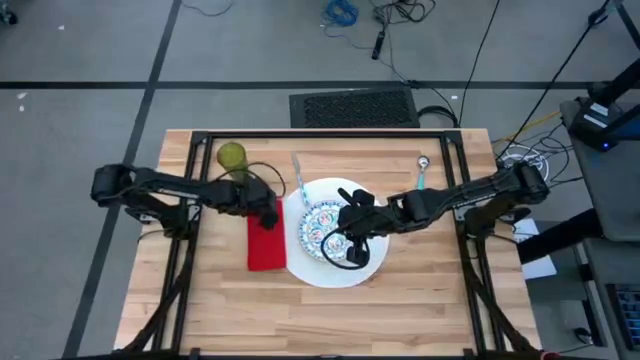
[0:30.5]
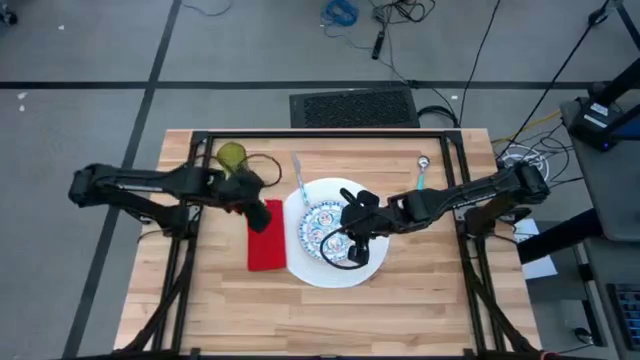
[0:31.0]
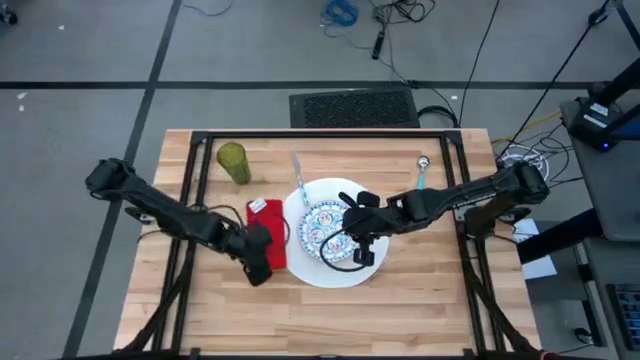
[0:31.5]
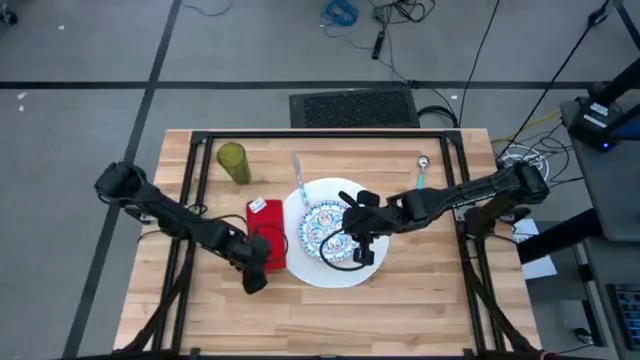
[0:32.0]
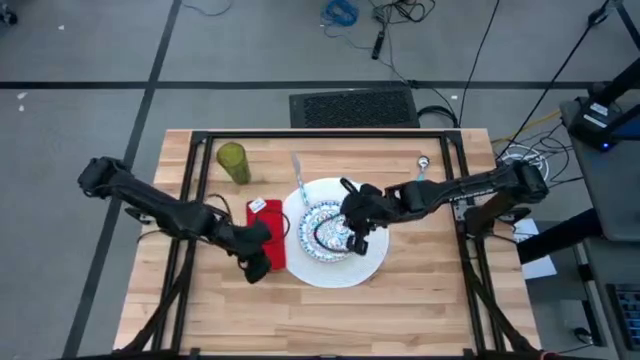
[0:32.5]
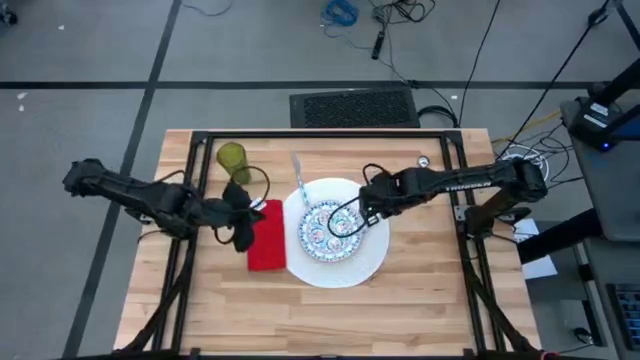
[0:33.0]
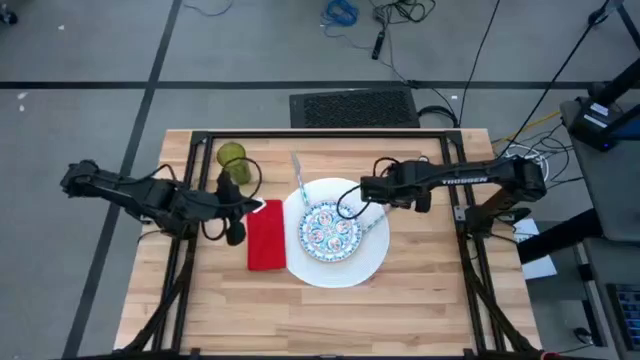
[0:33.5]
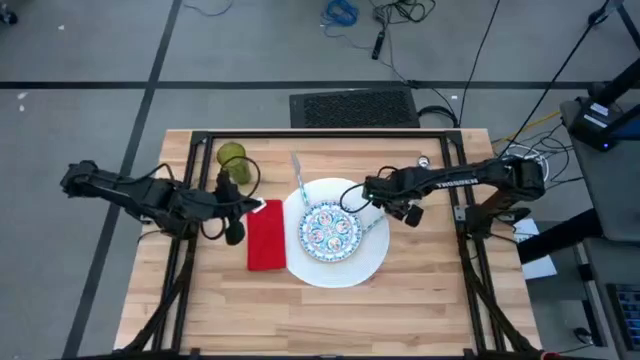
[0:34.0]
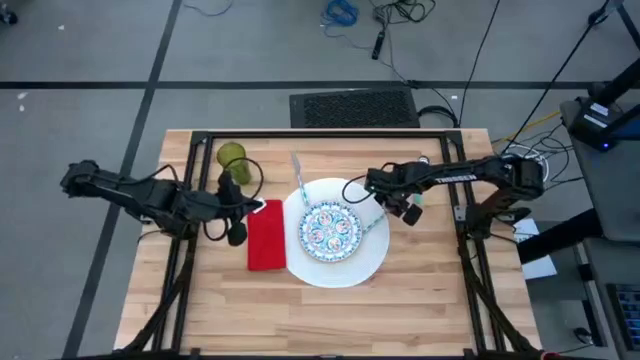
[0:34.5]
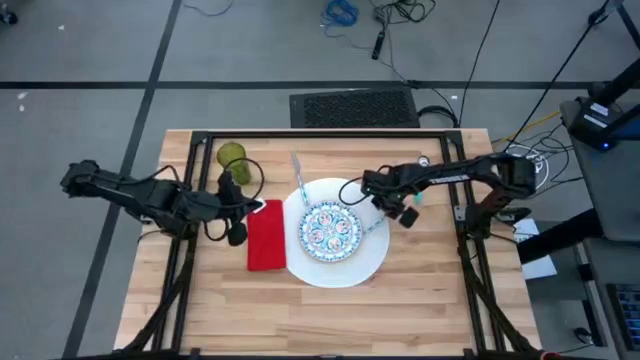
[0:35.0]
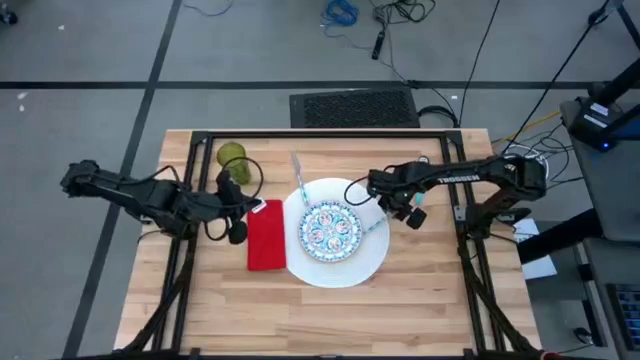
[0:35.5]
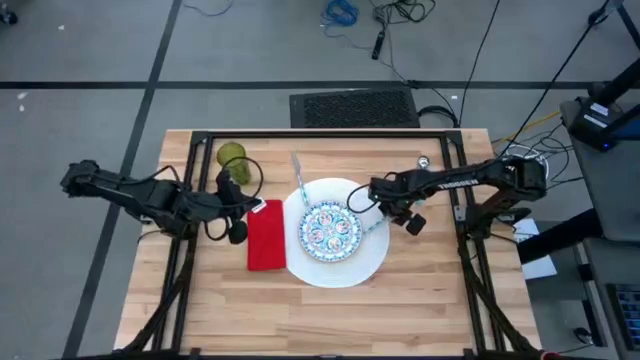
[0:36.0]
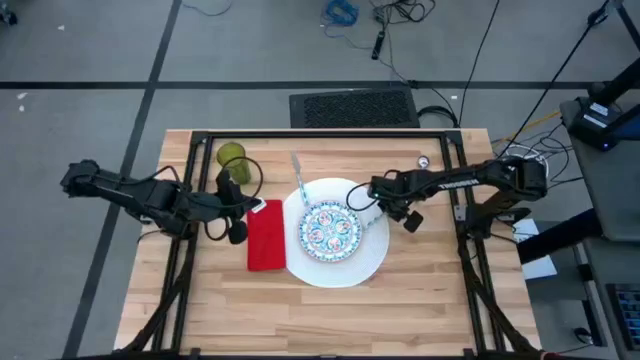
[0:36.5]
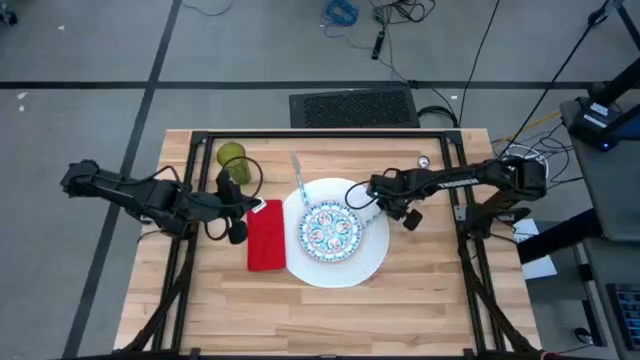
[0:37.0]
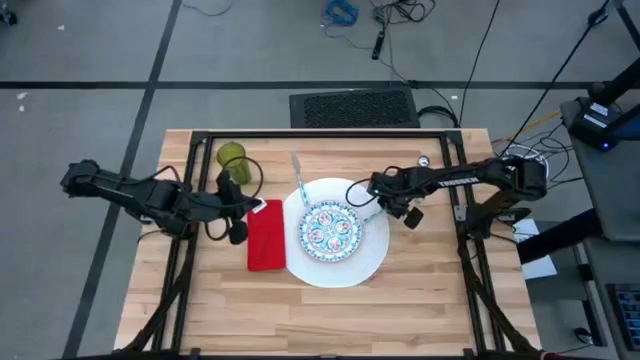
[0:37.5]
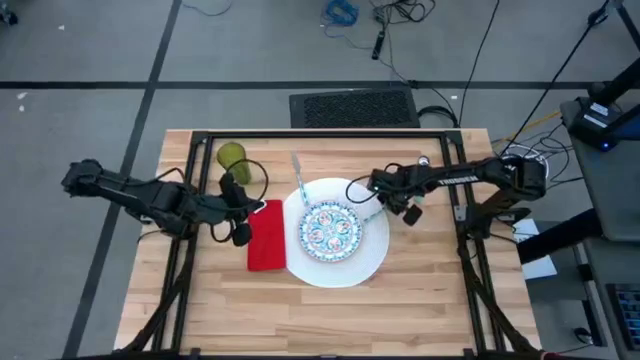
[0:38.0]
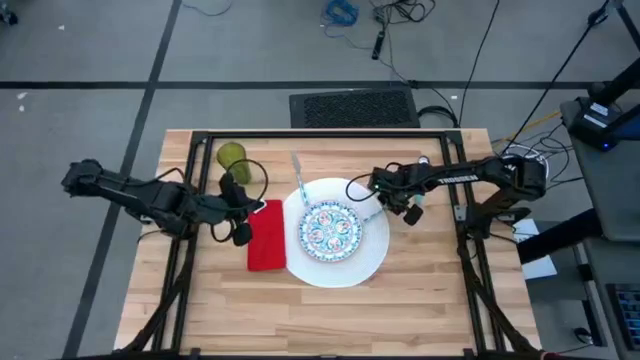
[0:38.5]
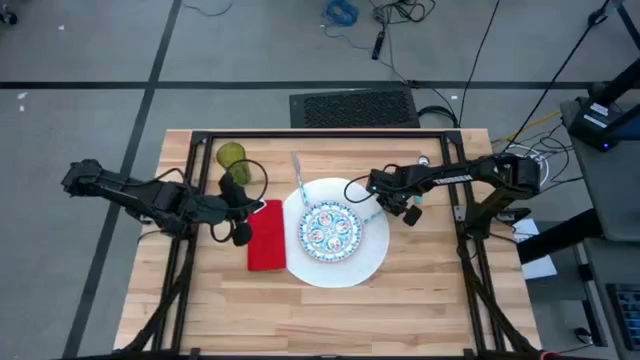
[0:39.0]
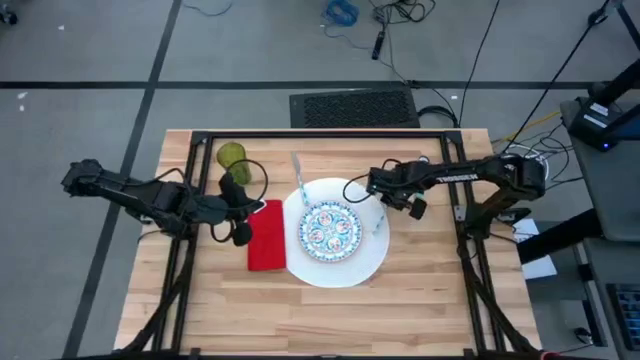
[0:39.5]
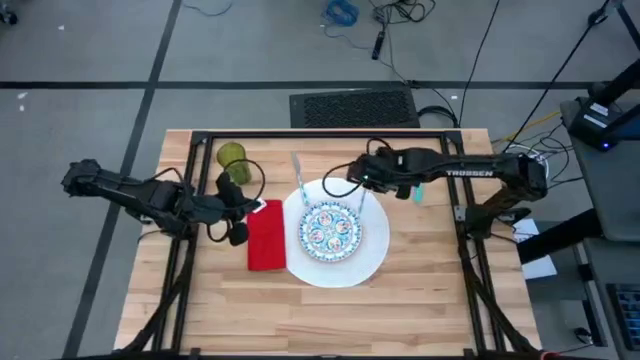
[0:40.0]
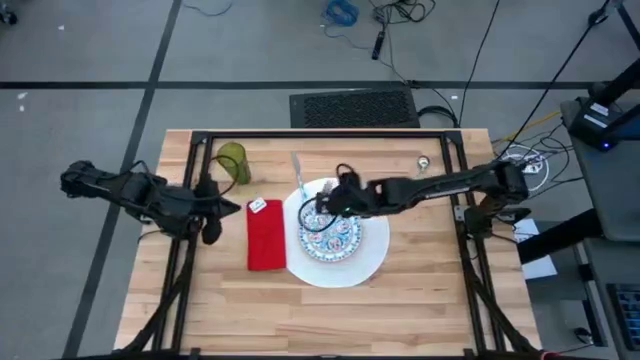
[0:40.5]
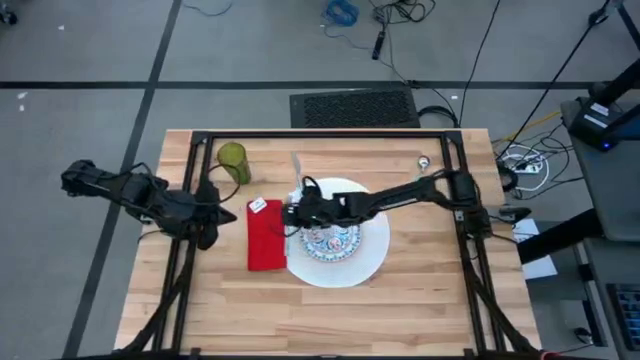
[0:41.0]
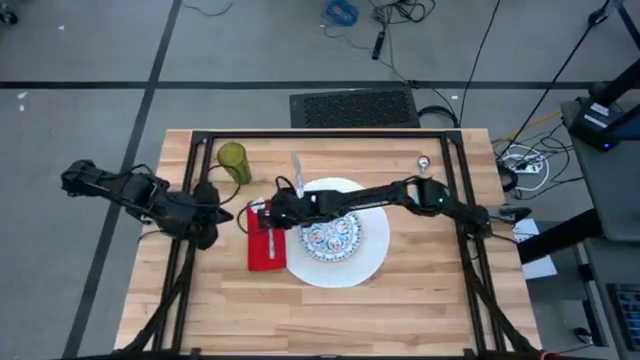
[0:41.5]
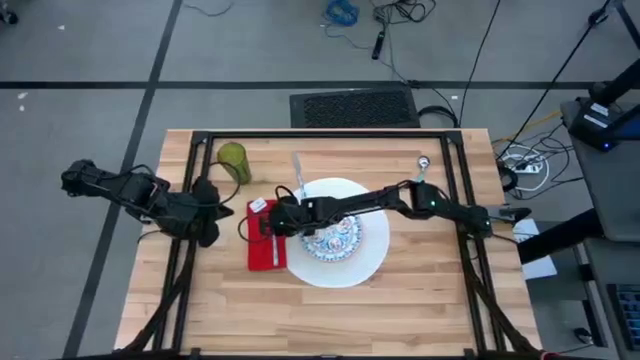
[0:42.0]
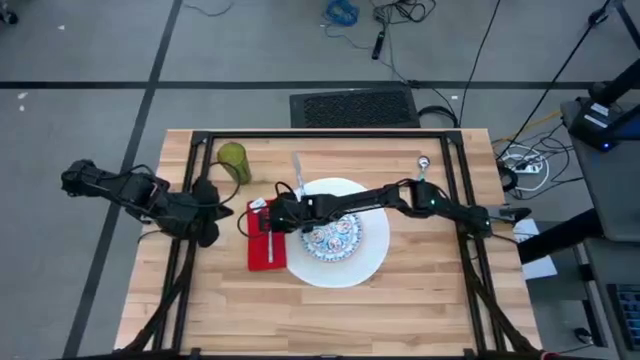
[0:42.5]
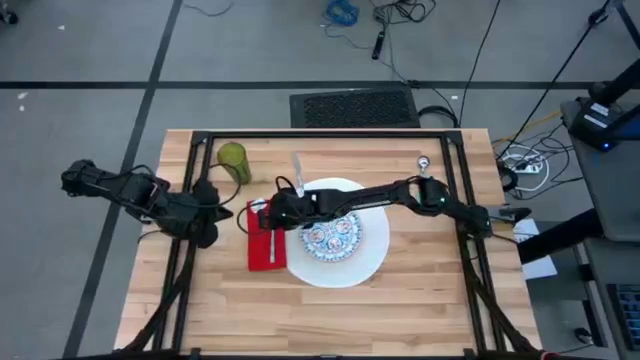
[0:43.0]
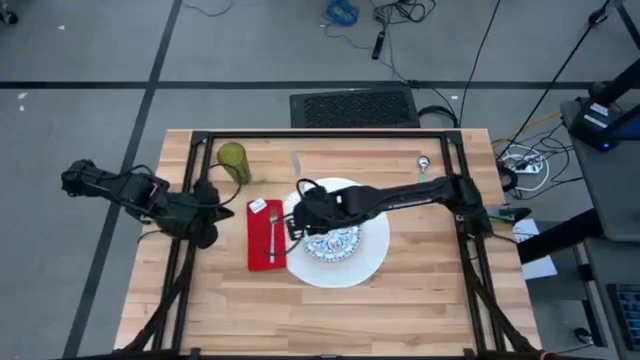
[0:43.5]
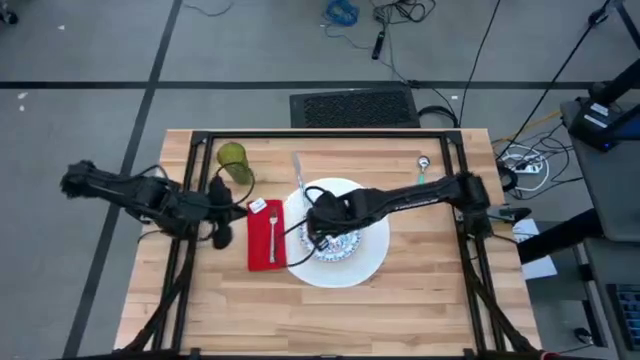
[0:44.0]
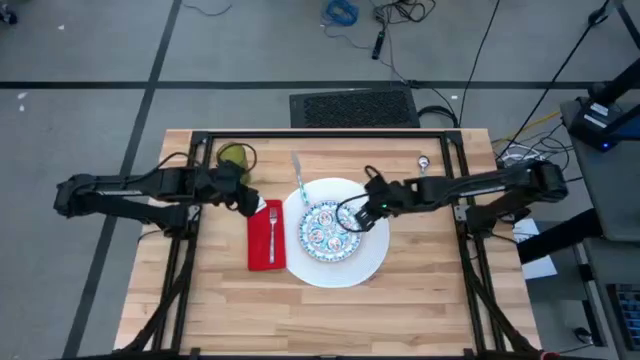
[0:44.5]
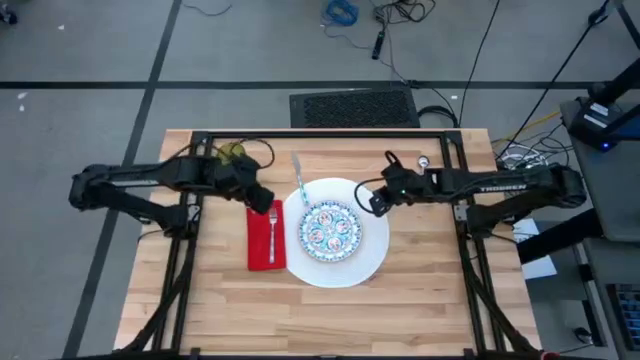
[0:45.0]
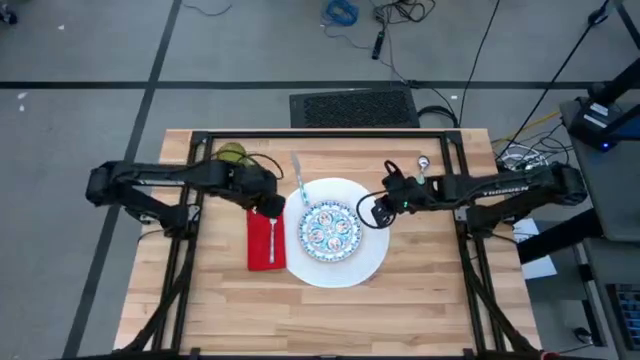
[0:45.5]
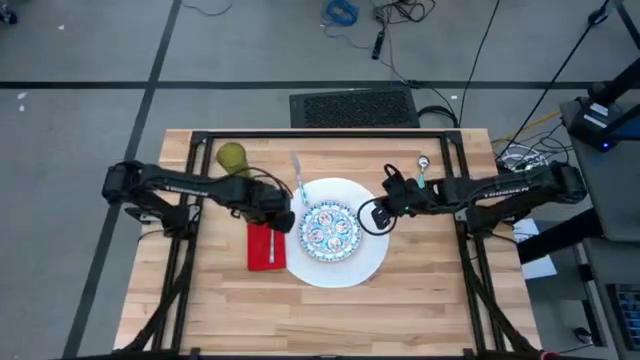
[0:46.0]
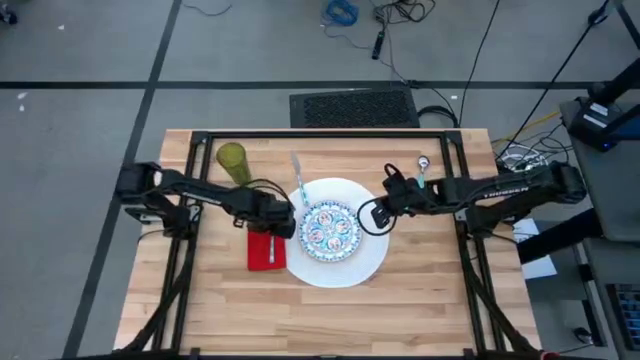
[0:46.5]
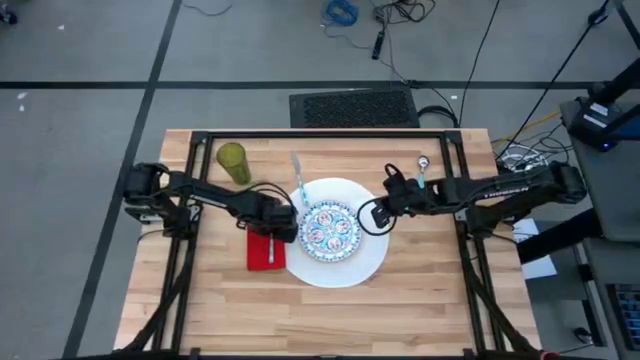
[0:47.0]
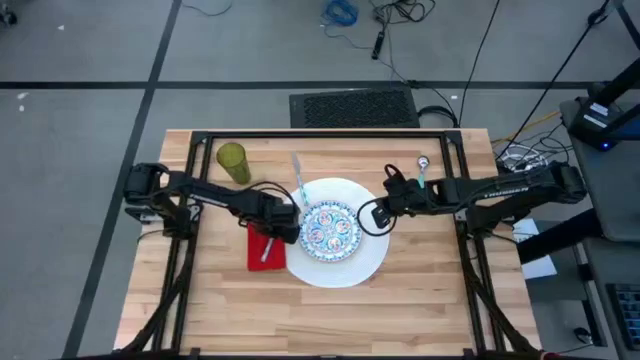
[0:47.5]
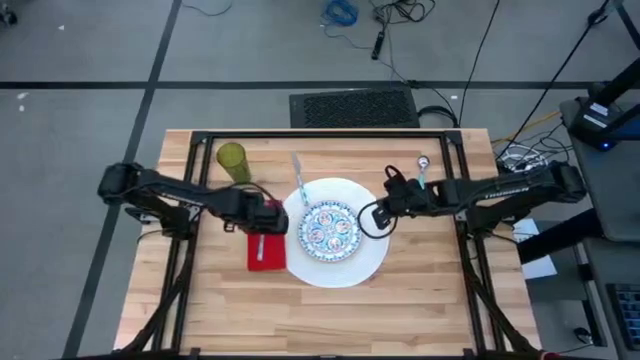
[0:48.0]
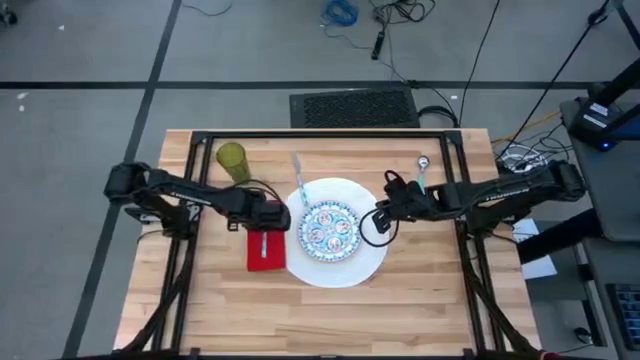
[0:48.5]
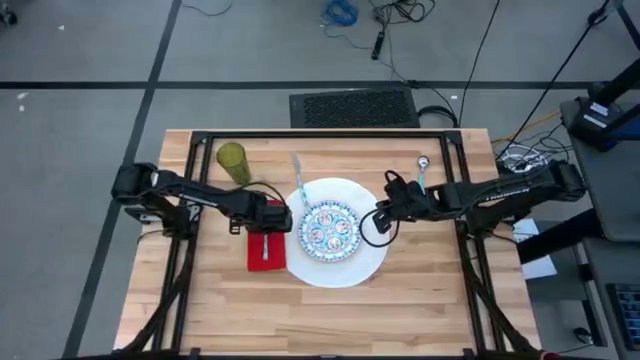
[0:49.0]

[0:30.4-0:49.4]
Task: Set table place
Put the white fork on top of the red table napkin on the white tablemat
